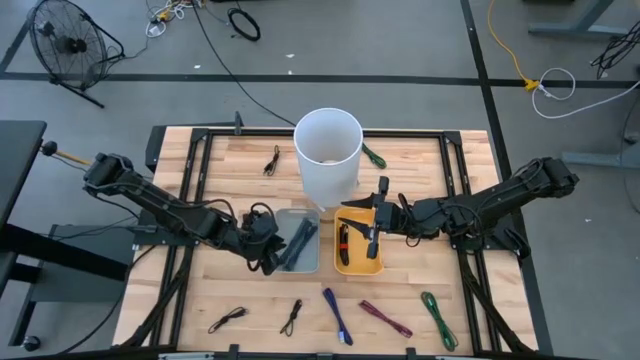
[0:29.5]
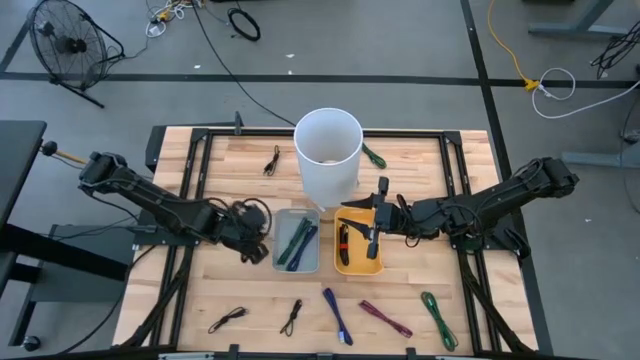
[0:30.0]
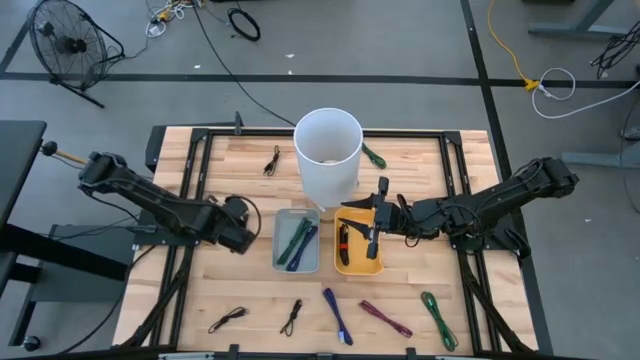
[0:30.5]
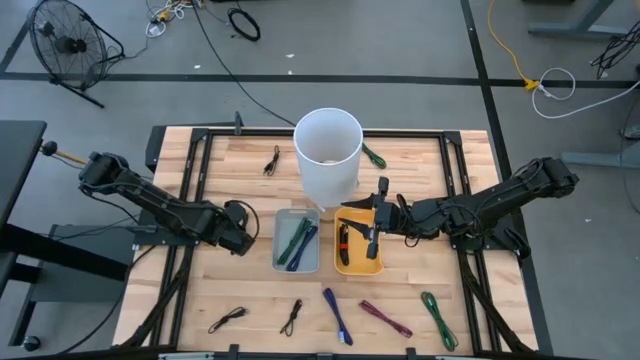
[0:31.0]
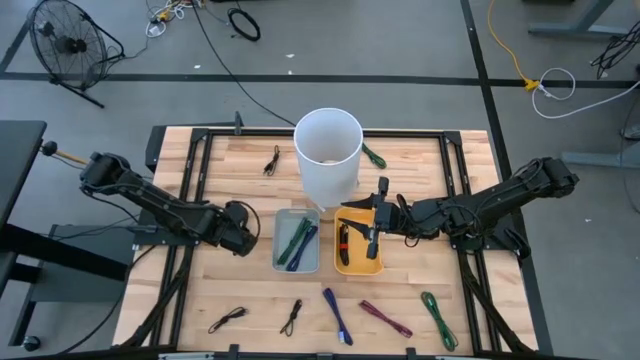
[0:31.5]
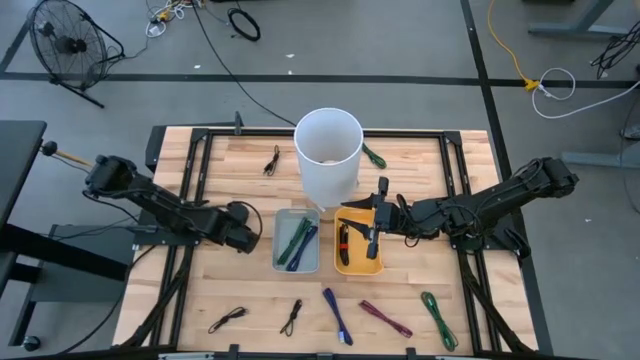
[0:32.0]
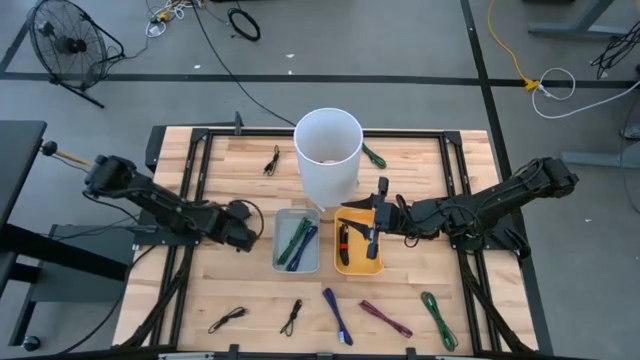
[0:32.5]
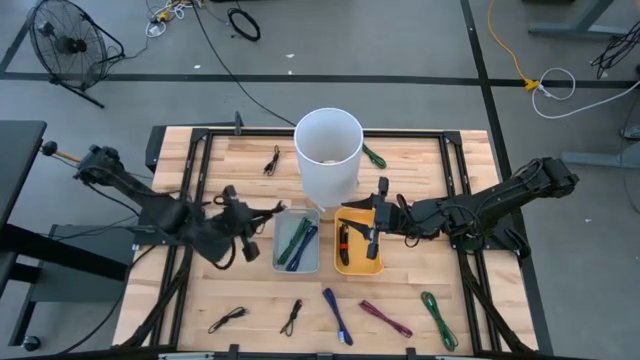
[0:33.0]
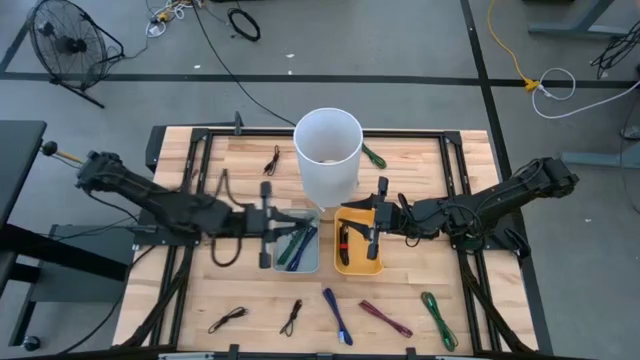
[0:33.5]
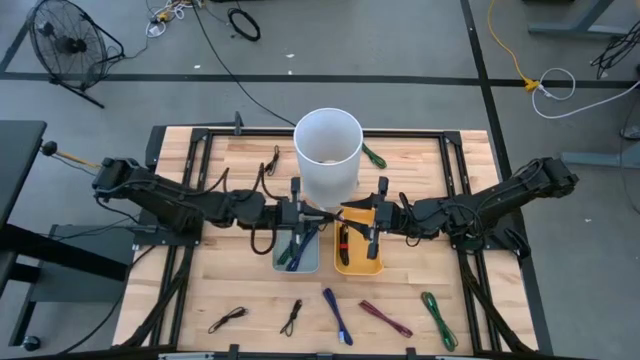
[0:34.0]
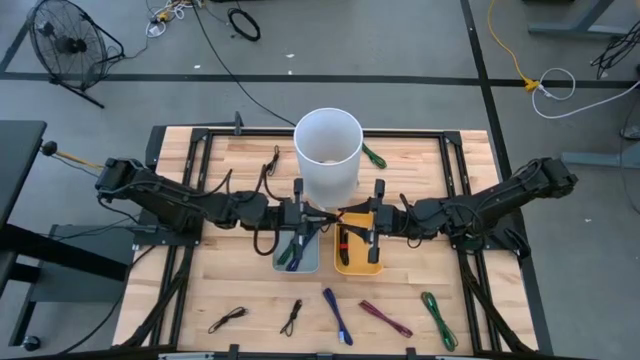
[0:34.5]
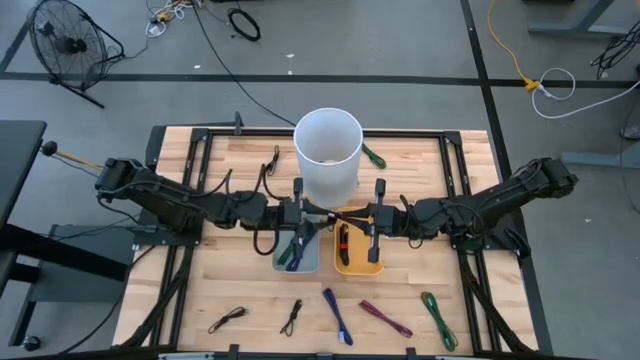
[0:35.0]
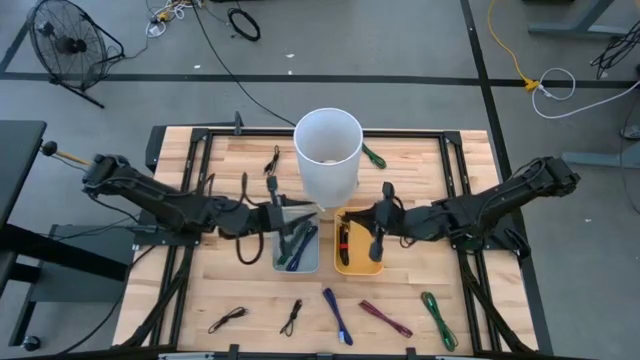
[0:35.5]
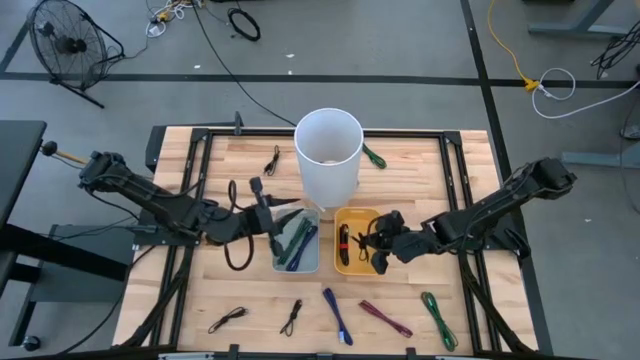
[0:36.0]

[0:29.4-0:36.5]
Task: Pick & Place USB Port
Put the black charger cable into the yellow bin

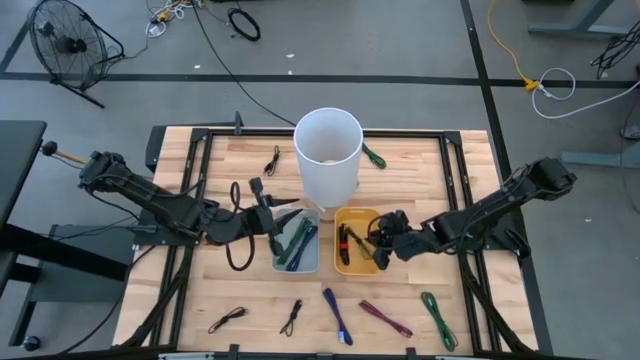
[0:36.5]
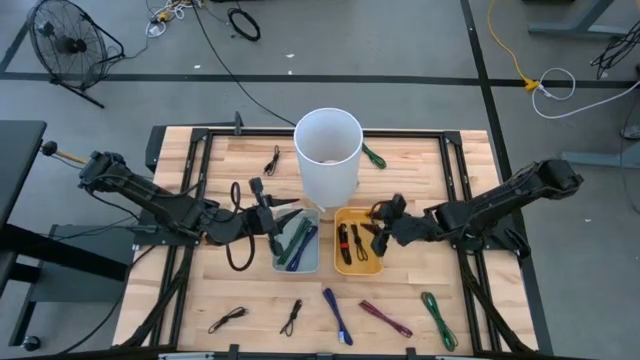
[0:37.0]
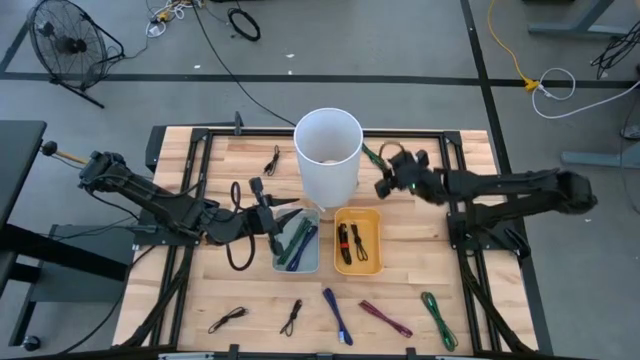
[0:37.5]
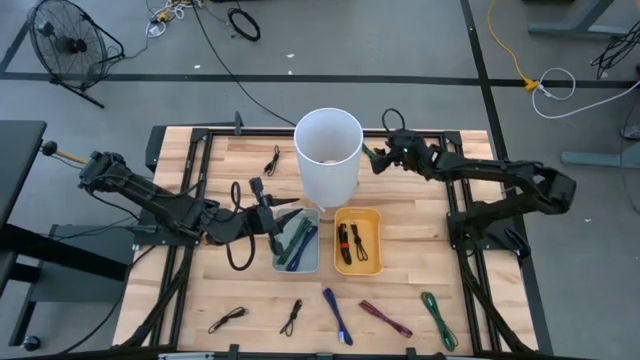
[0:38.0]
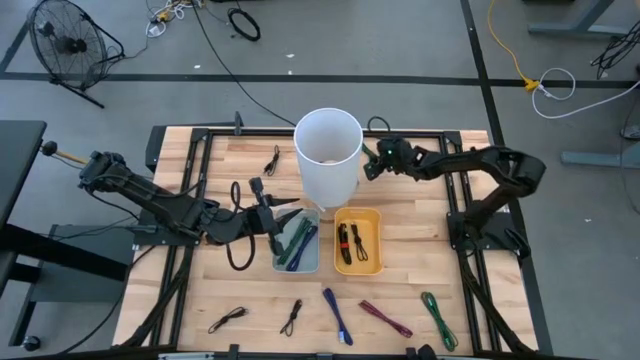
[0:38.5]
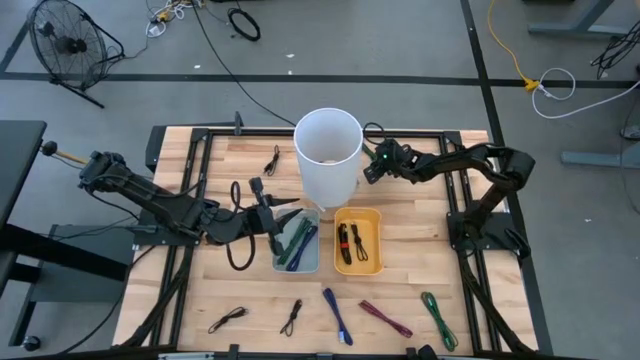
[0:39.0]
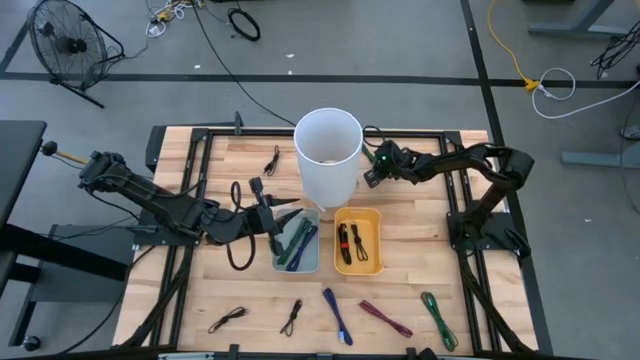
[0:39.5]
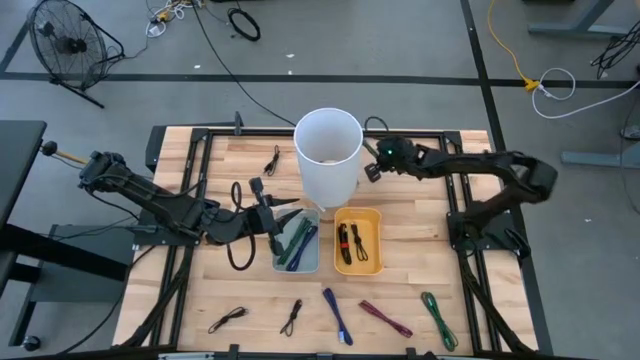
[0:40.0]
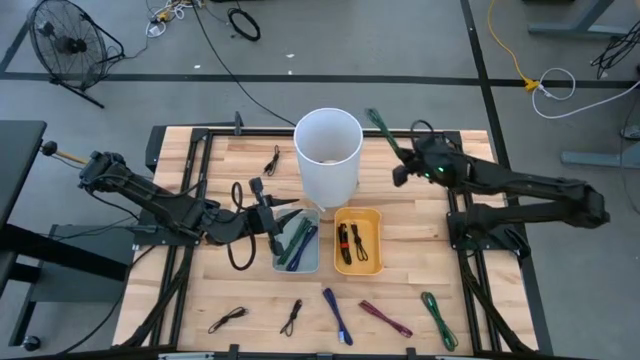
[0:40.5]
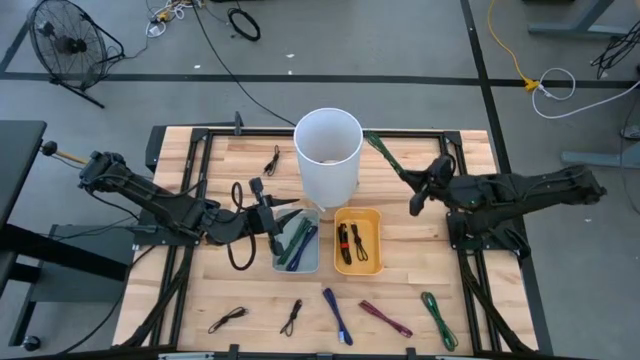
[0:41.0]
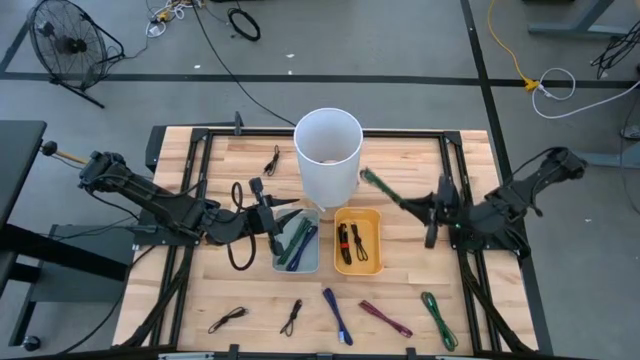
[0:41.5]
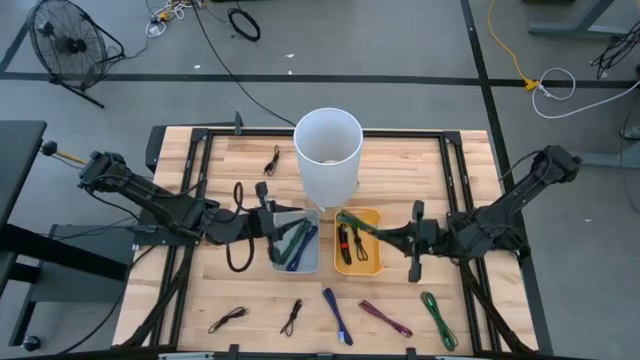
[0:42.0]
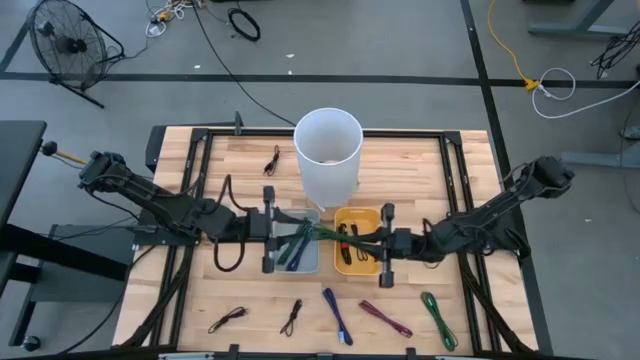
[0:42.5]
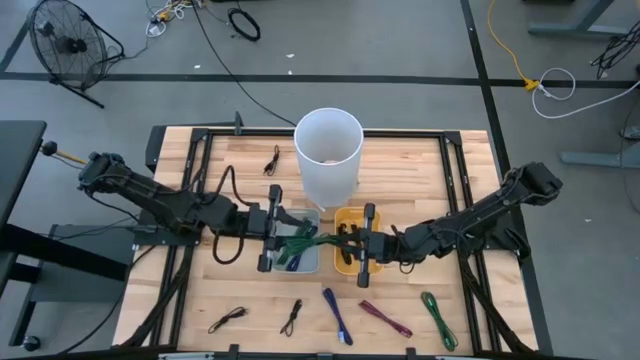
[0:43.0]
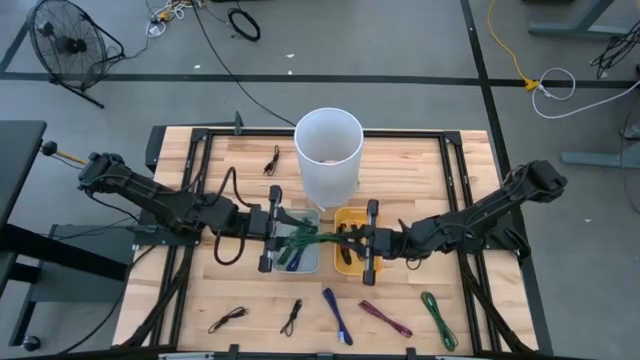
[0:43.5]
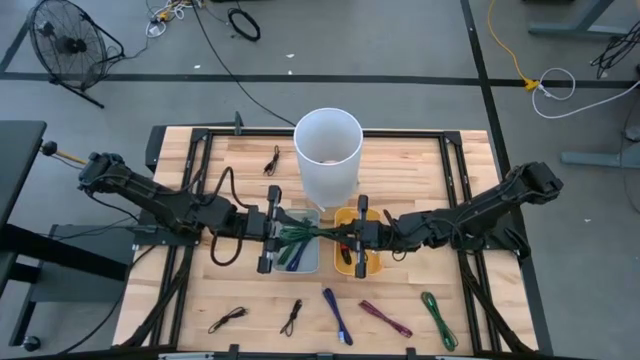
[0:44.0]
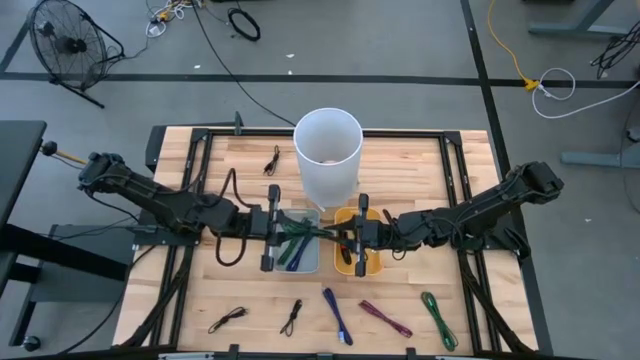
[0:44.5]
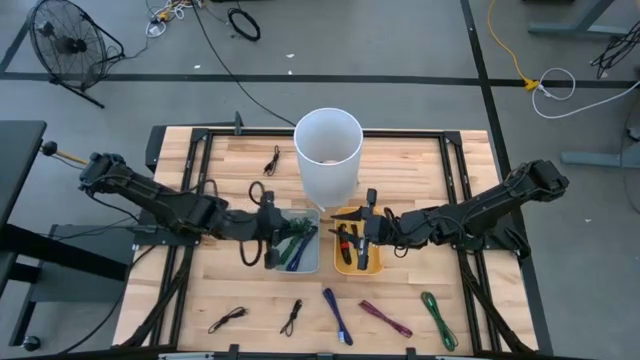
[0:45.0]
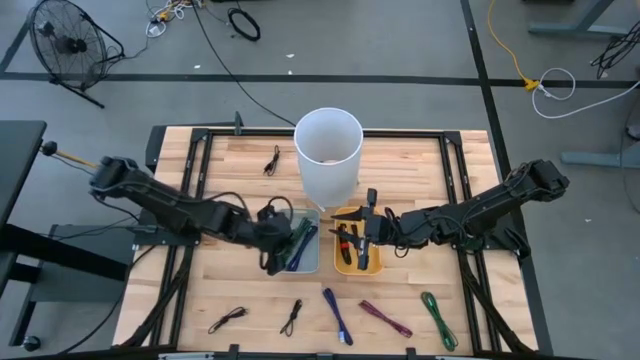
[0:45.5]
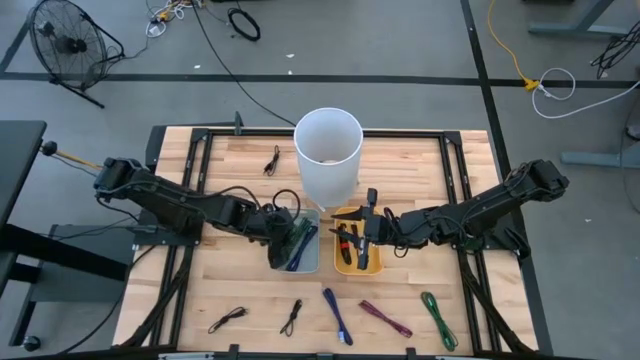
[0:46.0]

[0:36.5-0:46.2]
Put the green charger cable into the gray bin

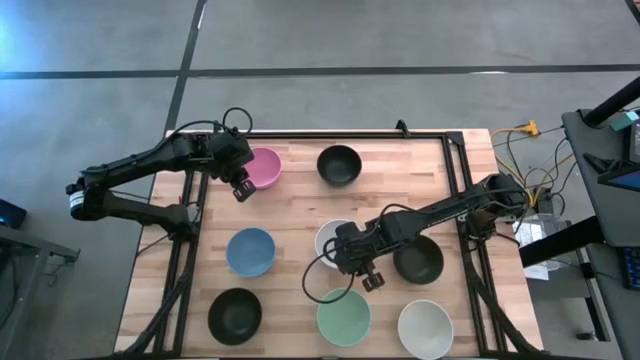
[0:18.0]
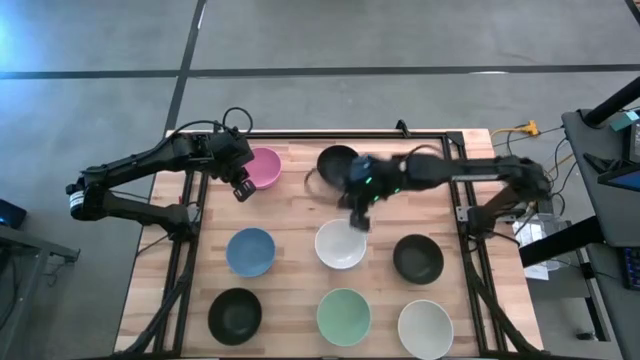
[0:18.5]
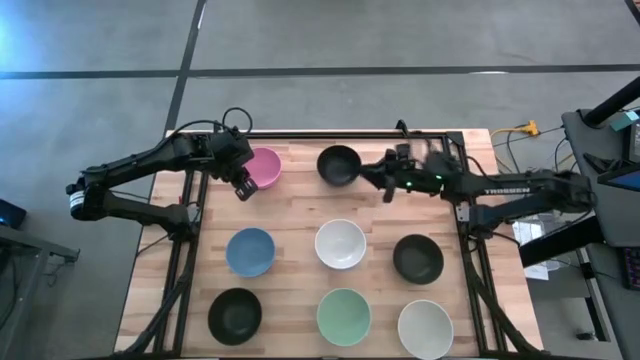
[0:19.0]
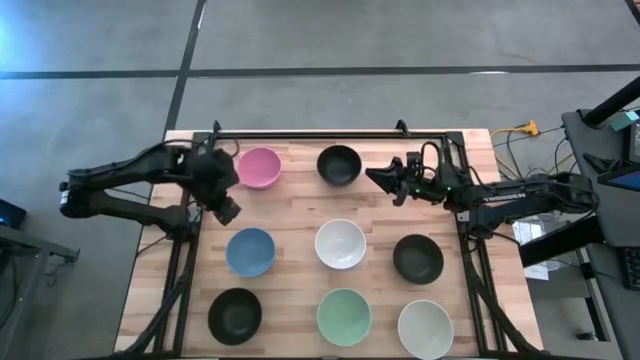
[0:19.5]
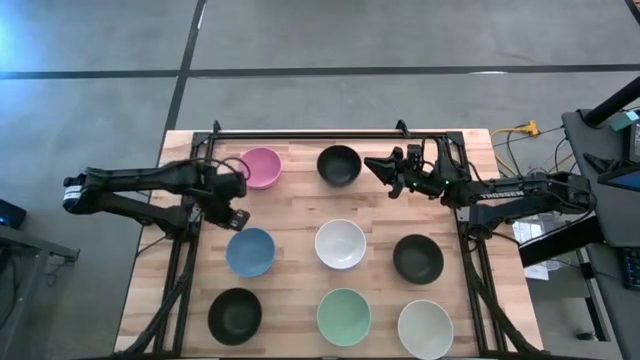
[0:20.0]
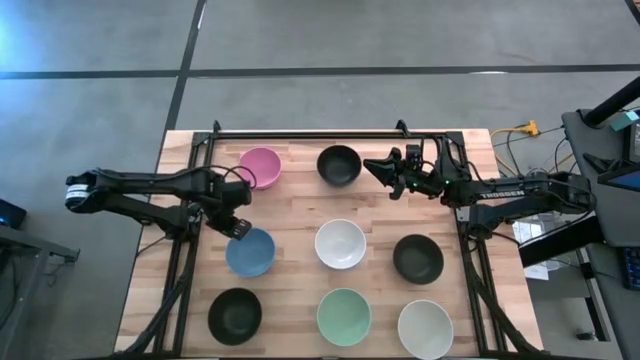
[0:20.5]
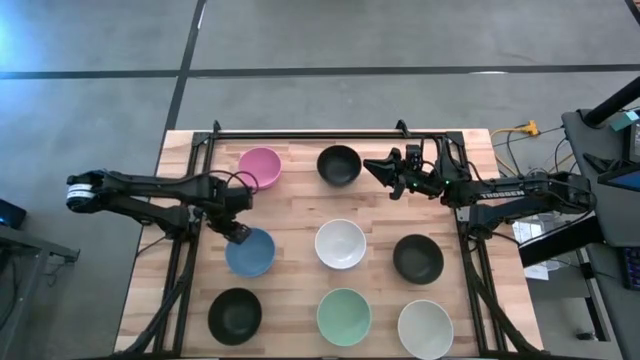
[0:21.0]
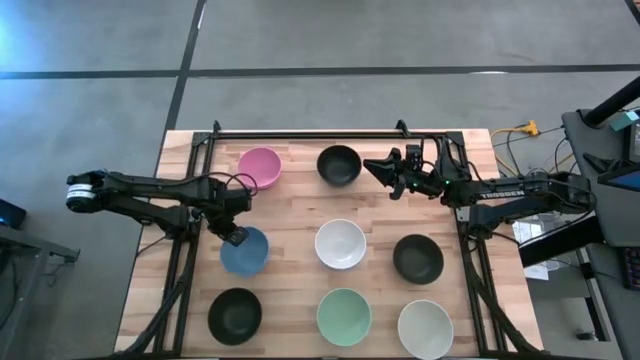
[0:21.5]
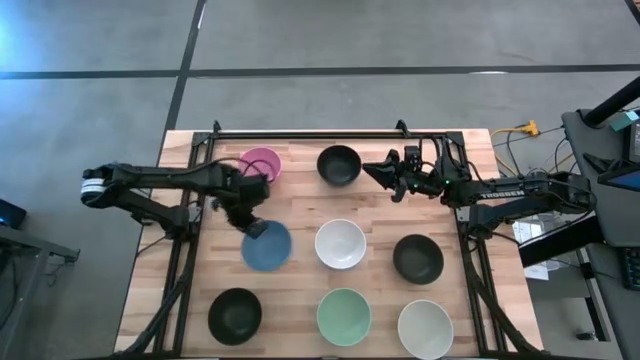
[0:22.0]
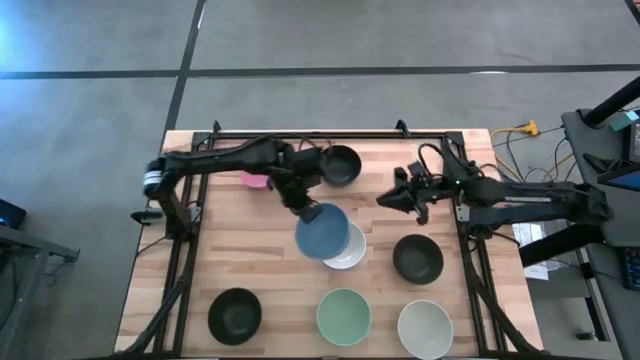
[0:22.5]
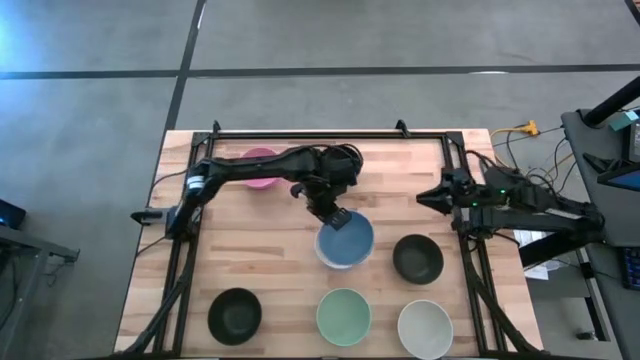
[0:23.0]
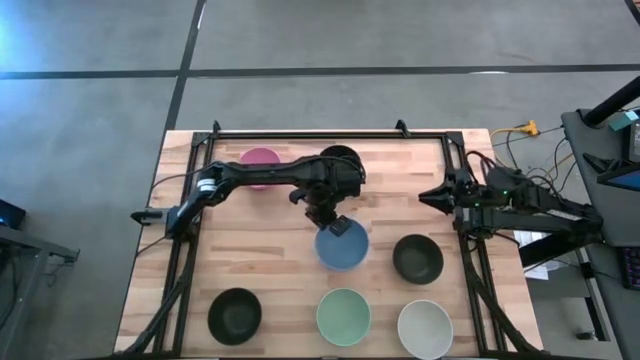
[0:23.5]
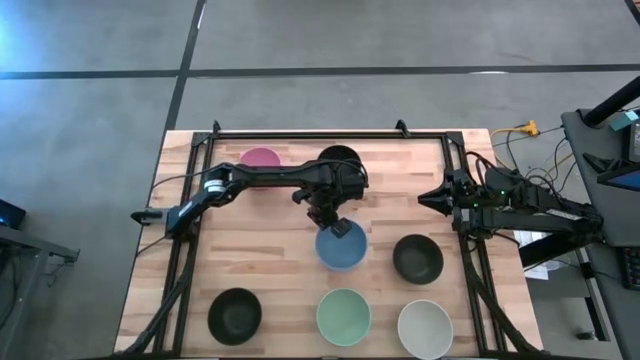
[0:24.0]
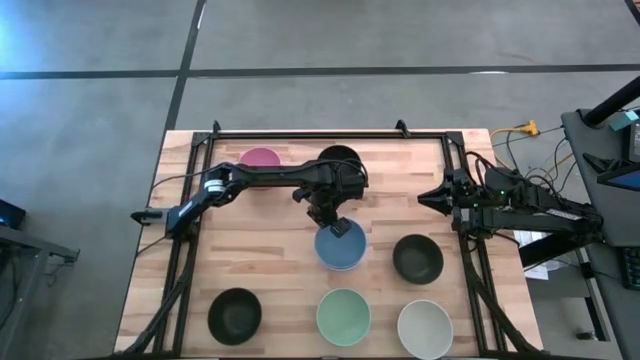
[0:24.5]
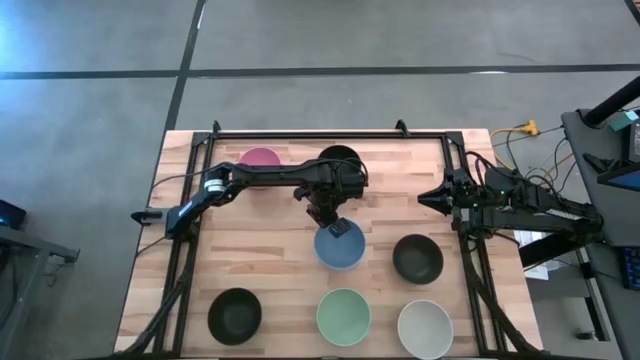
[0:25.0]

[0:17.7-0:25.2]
Task: Nest bowls inside each other
Stack the blue bowl on top of the white bowl
